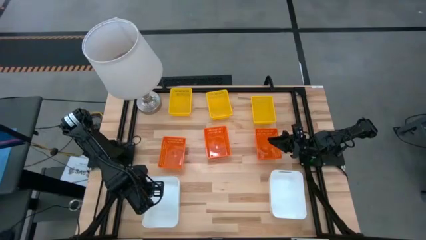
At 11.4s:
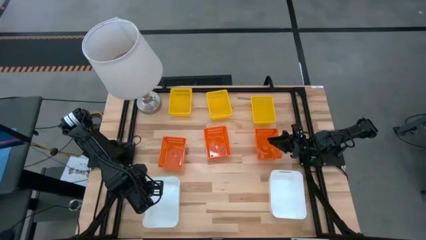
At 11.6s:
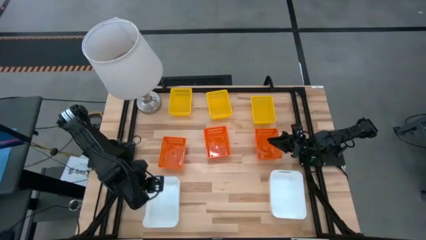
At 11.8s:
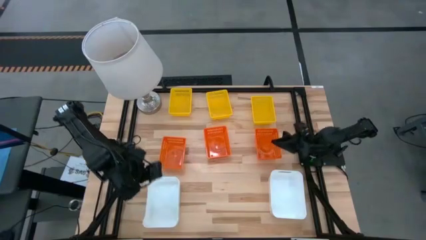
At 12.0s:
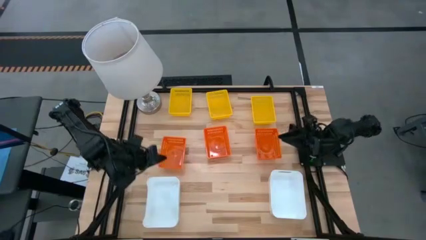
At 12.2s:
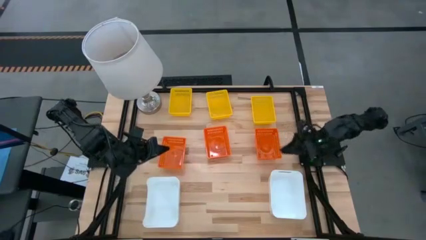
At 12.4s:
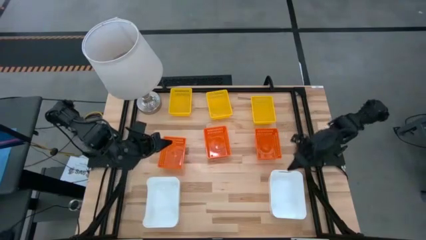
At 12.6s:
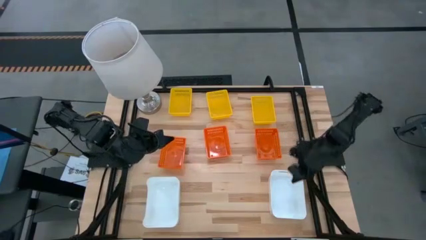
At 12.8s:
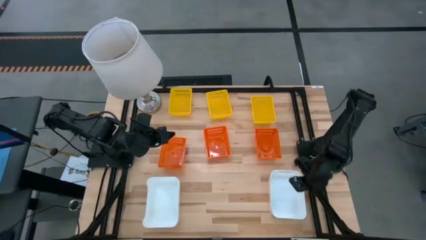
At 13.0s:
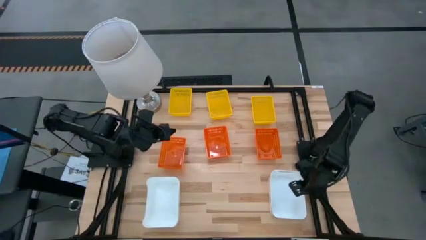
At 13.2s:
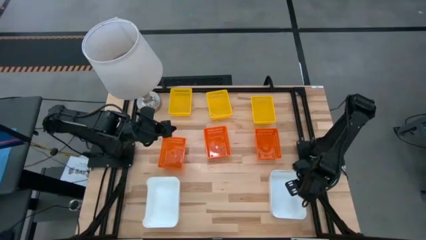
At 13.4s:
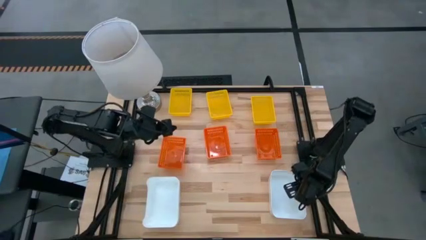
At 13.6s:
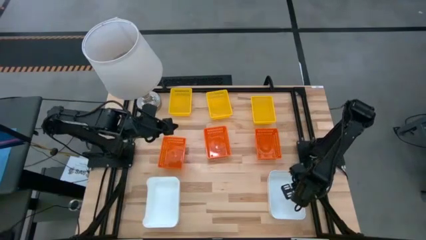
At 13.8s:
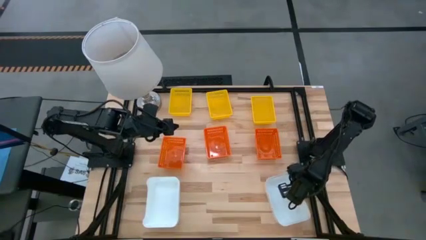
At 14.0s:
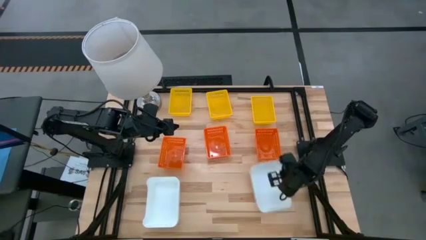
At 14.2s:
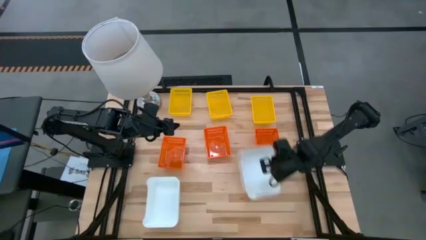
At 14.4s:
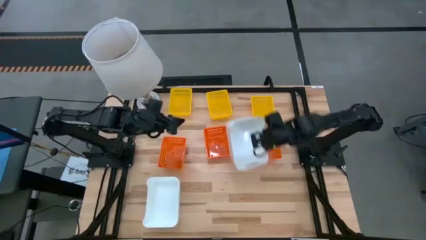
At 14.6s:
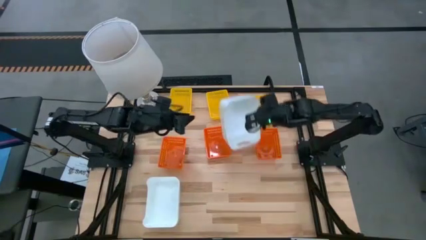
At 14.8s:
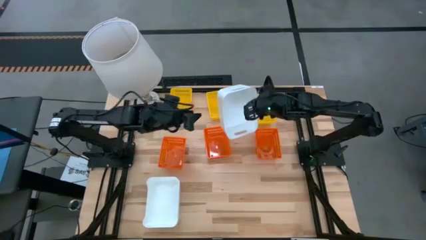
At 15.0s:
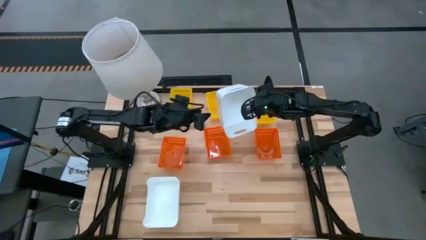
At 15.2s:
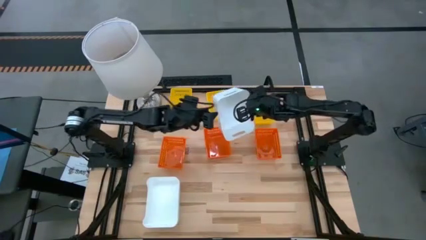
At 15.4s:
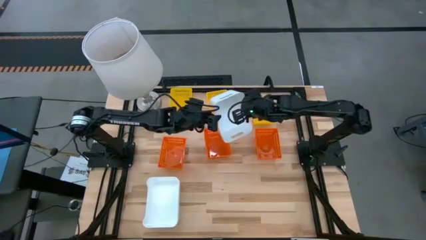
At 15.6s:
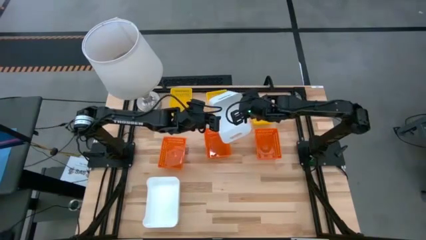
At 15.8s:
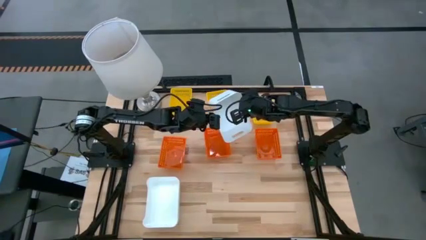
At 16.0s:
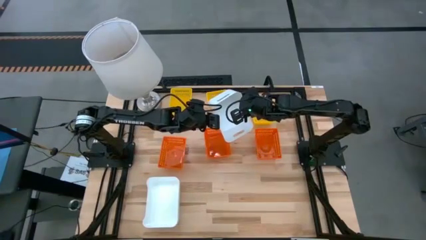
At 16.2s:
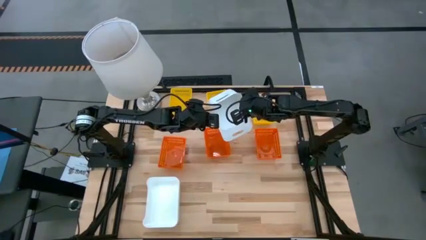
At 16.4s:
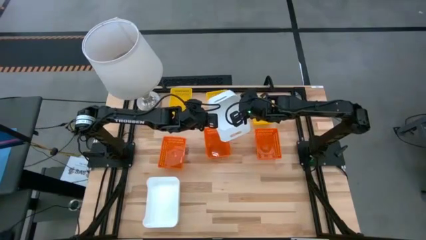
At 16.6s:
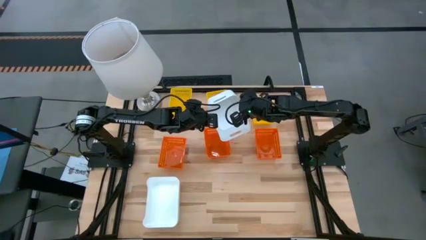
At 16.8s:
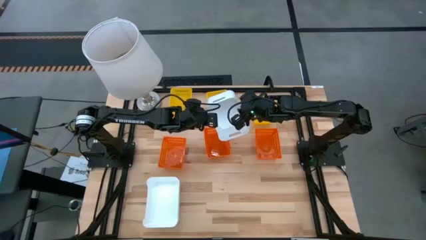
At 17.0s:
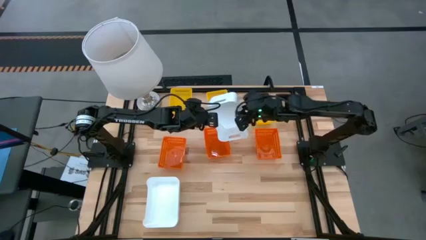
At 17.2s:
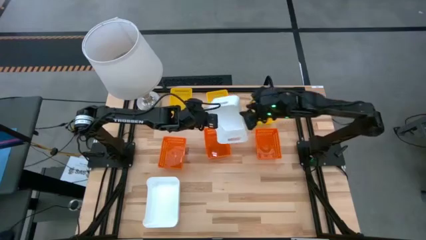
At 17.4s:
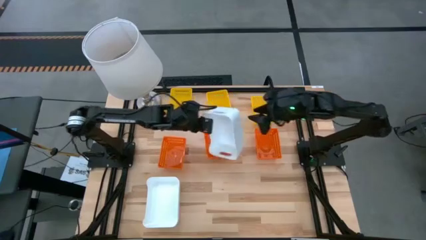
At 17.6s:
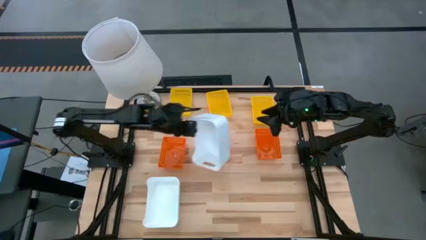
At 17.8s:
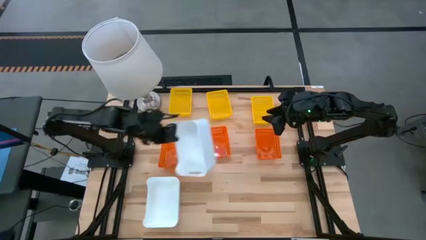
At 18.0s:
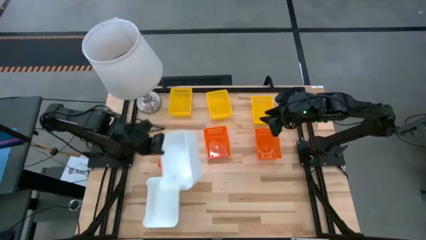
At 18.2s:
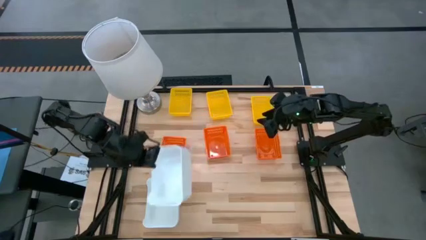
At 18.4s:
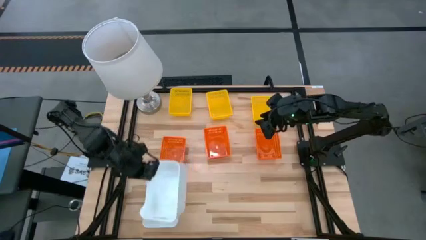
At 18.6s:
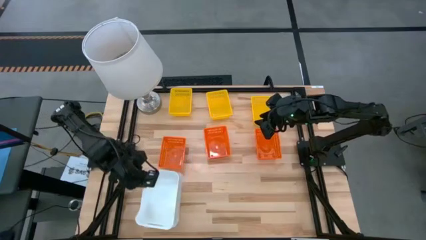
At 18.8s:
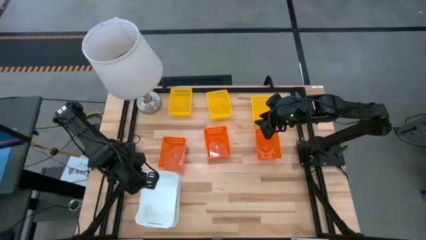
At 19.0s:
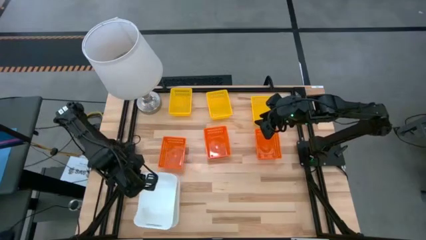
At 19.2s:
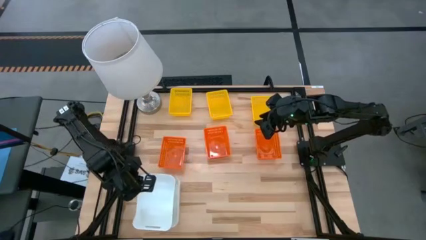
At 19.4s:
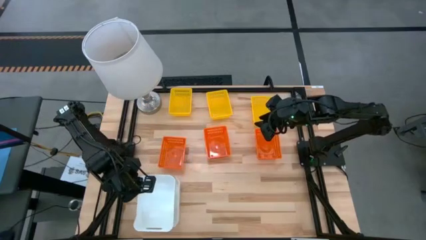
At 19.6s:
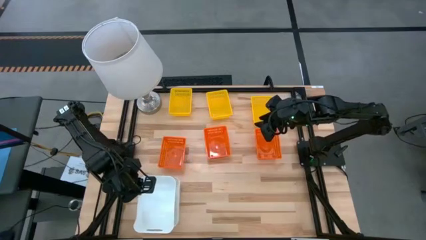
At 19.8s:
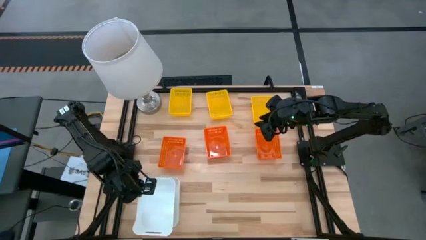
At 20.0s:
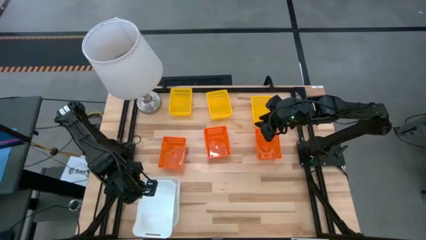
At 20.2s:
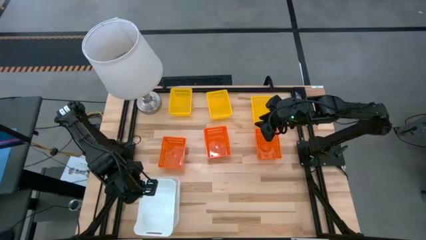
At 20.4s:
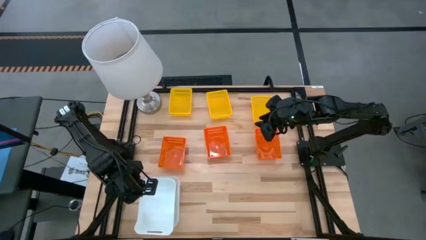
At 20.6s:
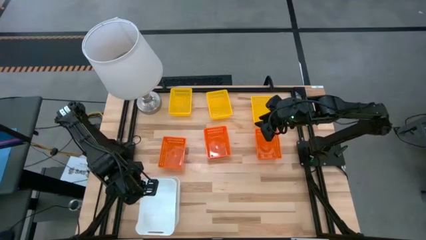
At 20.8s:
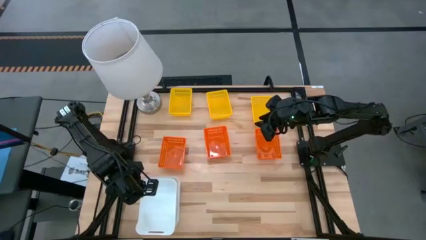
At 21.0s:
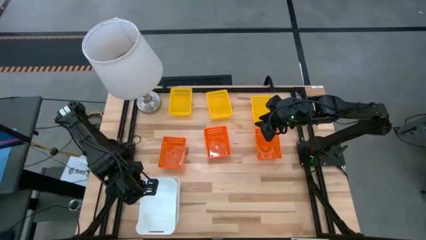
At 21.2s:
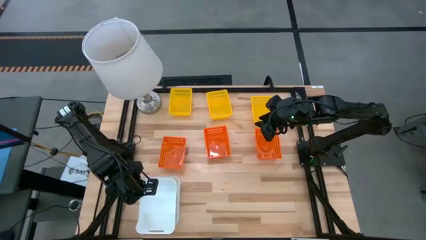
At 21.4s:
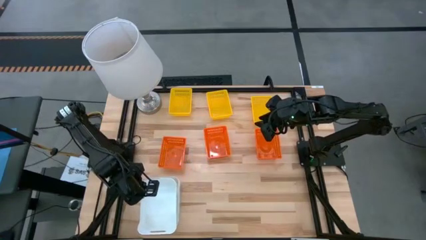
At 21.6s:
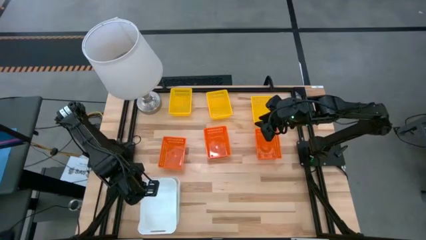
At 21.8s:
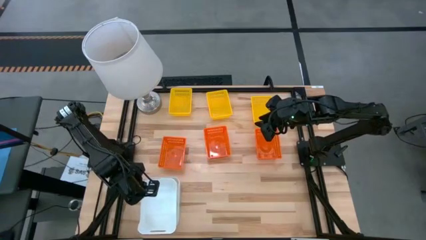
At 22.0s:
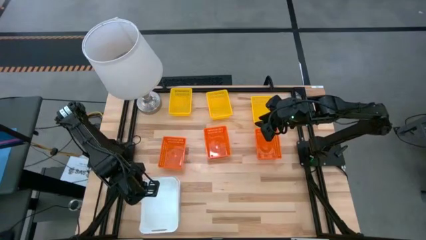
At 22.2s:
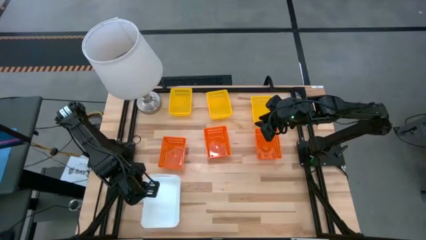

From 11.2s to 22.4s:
Stack the white bin on the left white bin
